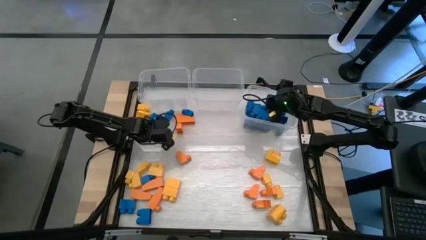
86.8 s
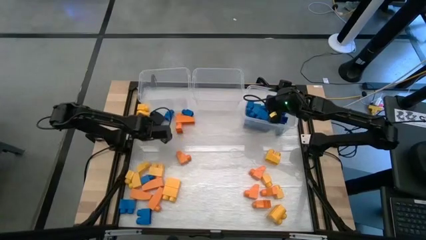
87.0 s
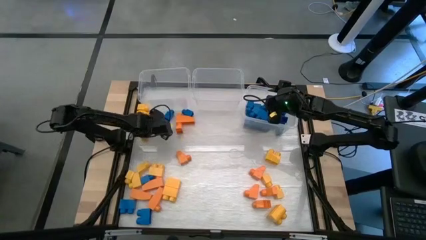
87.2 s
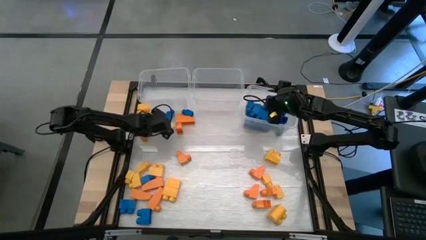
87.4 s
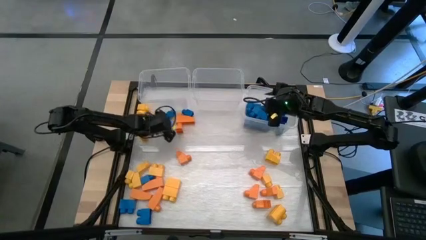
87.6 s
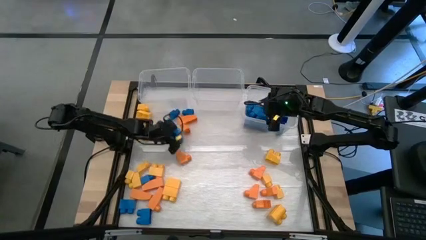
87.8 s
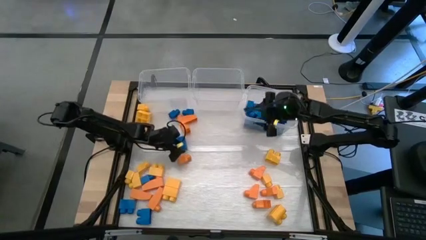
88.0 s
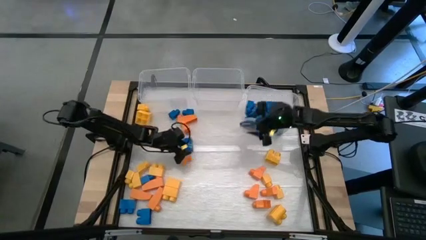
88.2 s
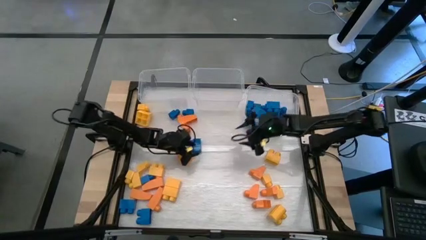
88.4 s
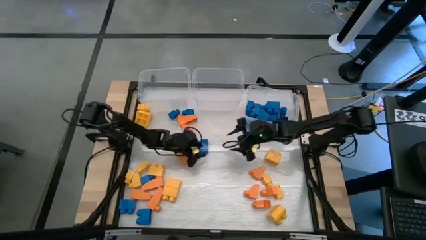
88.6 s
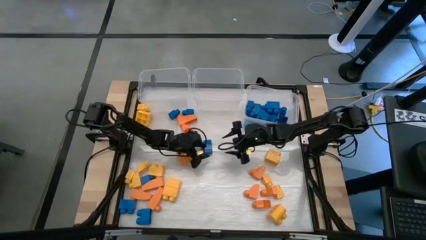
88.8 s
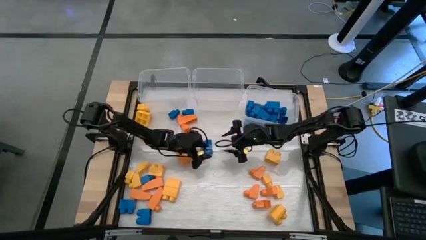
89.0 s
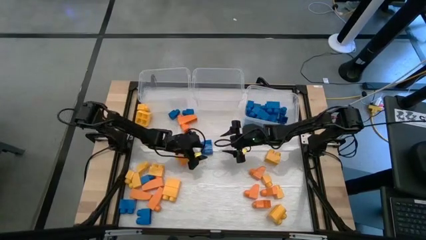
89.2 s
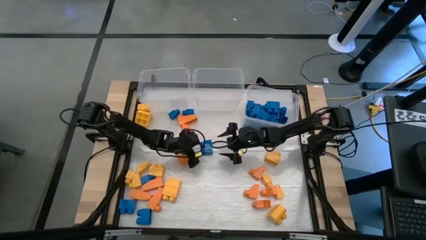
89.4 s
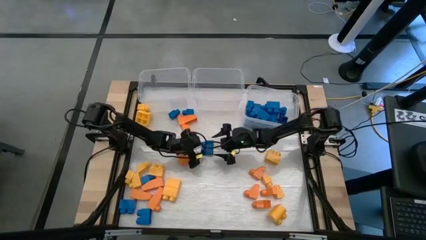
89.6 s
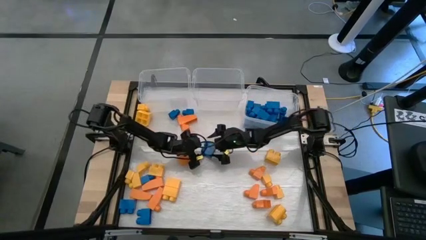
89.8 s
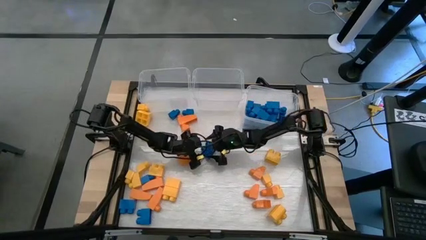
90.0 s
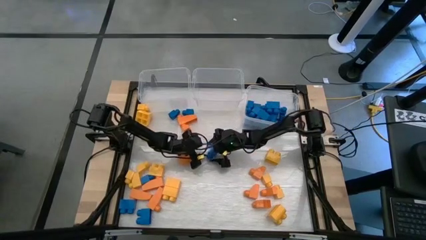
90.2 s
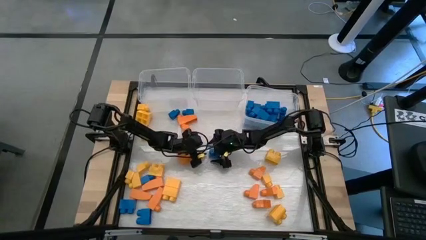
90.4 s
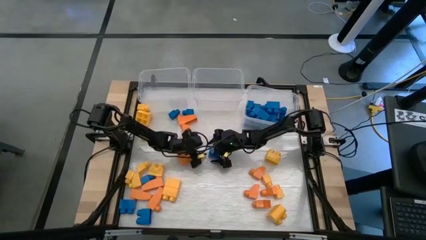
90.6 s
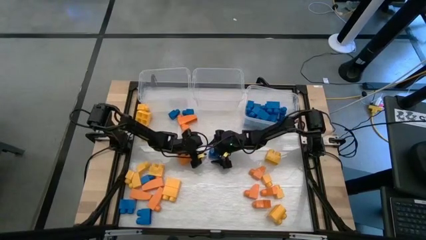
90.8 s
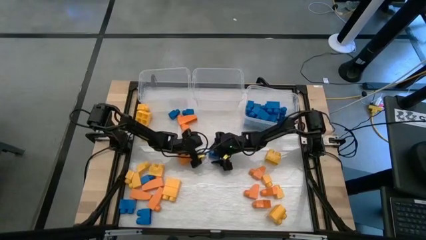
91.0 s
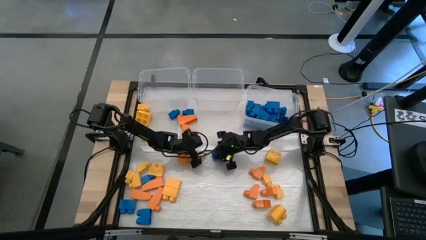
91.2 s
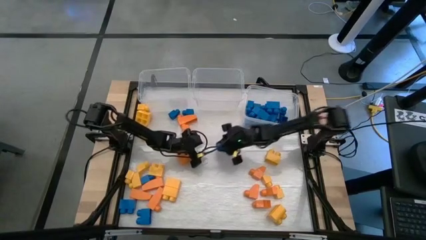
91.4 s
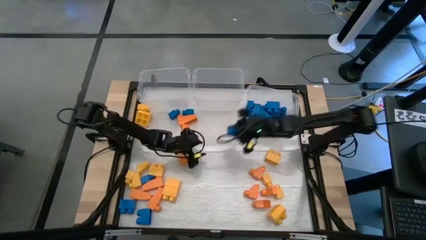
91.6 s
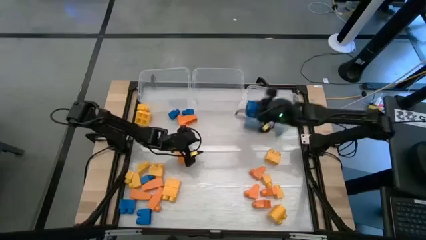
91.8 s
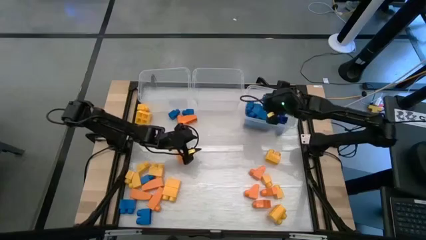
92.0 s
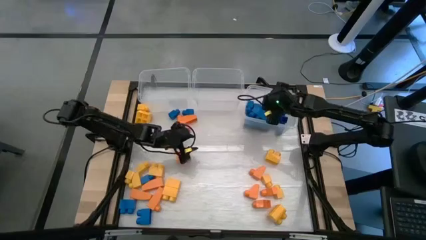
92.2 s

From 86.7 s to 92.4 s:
Task: Sort blocks
Put the blue game piece into the right transparent bin

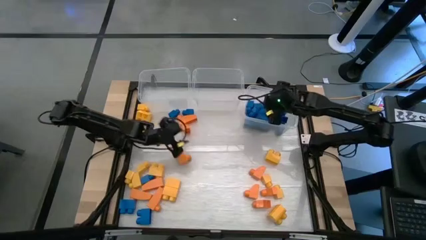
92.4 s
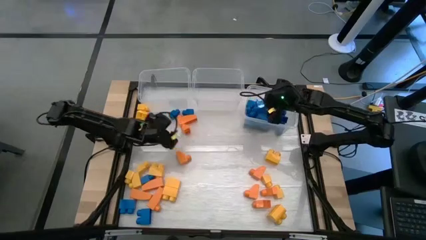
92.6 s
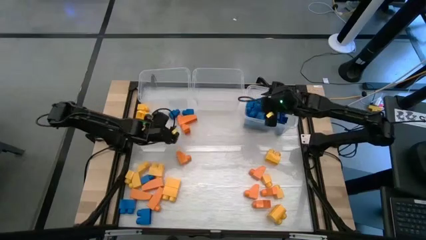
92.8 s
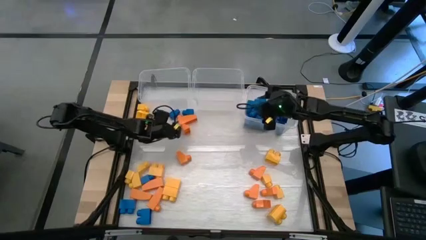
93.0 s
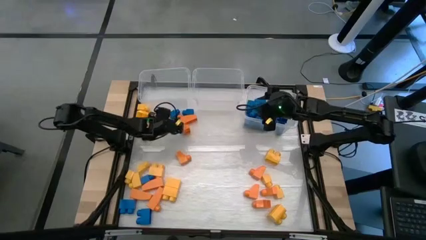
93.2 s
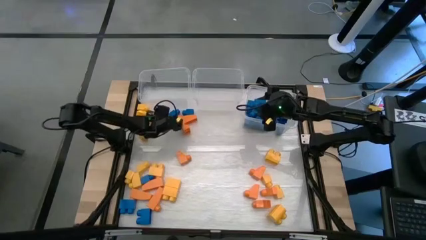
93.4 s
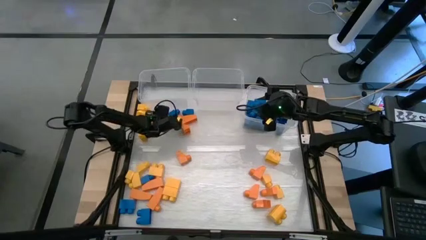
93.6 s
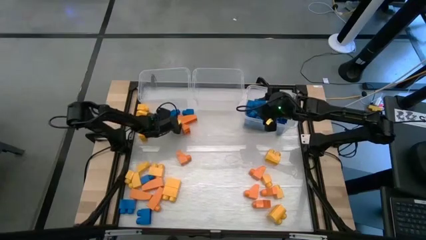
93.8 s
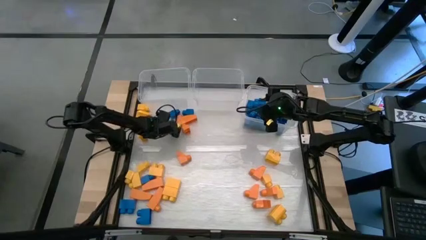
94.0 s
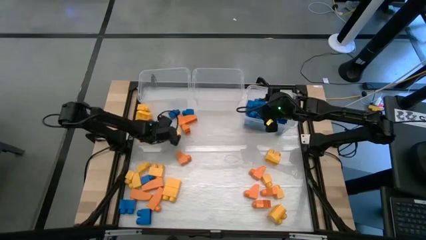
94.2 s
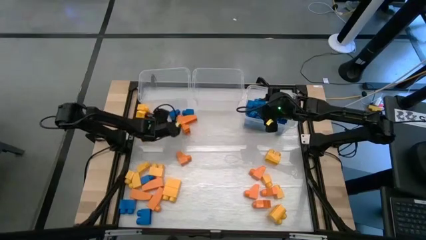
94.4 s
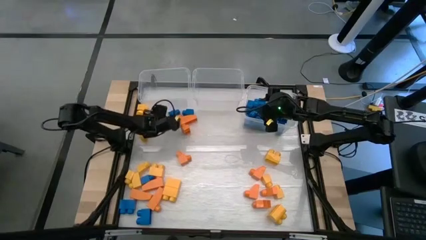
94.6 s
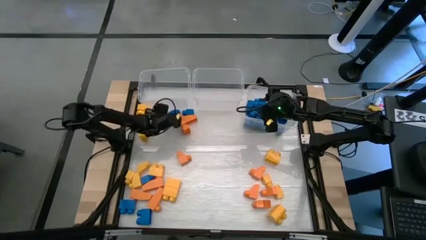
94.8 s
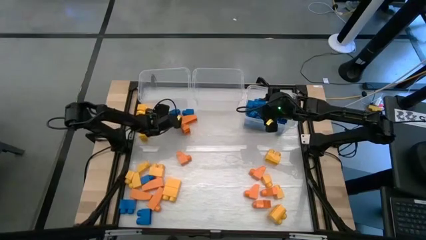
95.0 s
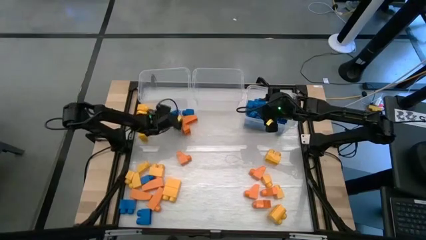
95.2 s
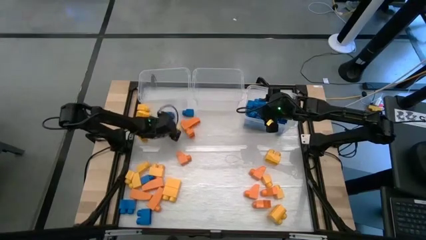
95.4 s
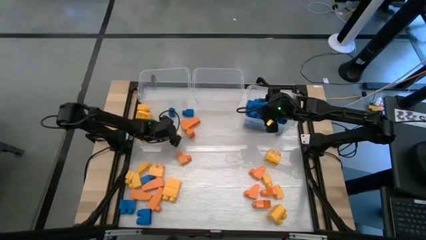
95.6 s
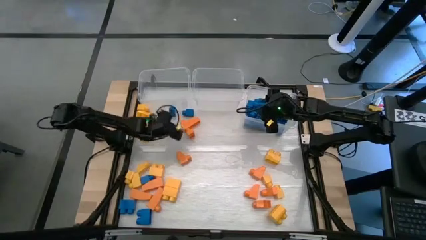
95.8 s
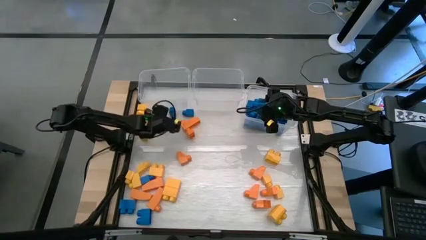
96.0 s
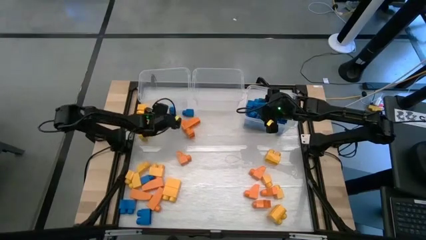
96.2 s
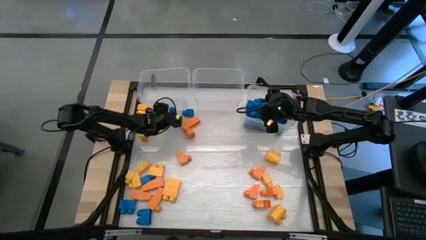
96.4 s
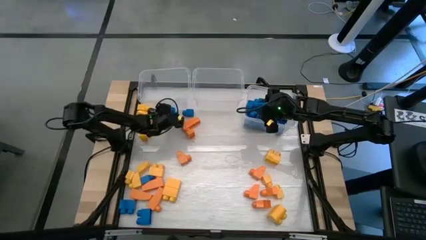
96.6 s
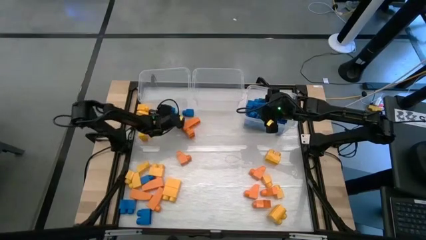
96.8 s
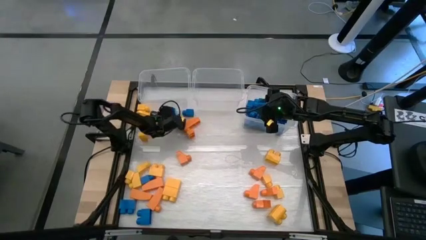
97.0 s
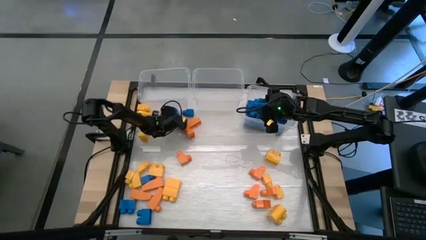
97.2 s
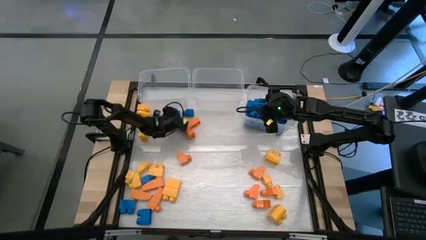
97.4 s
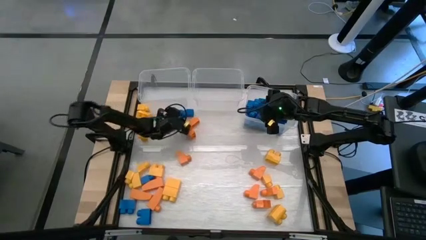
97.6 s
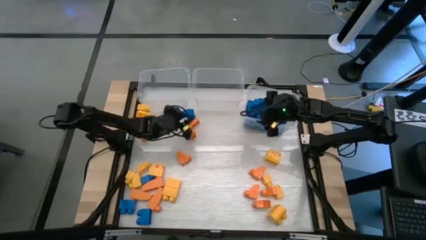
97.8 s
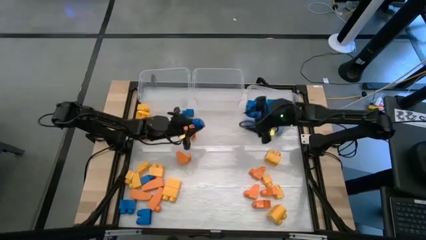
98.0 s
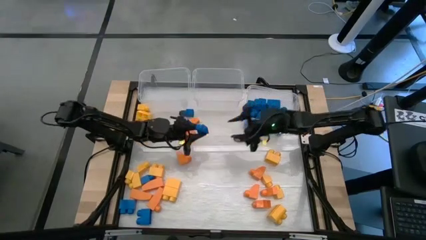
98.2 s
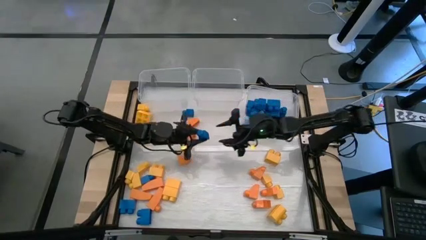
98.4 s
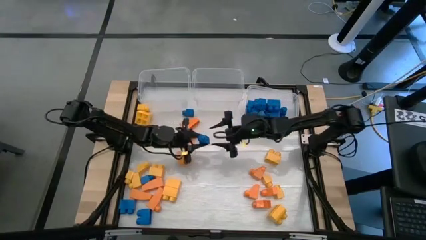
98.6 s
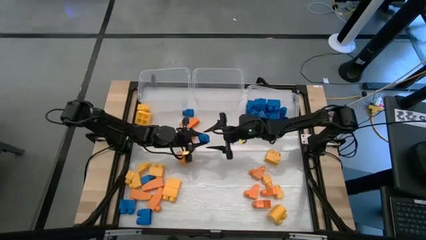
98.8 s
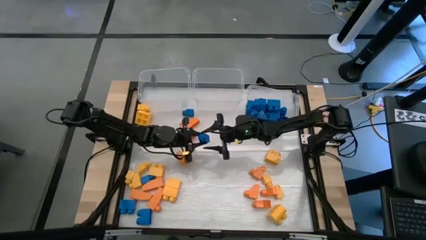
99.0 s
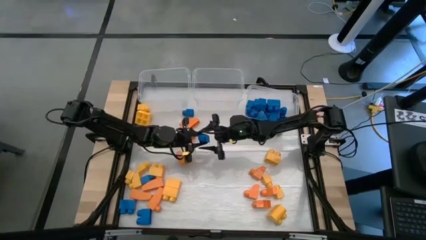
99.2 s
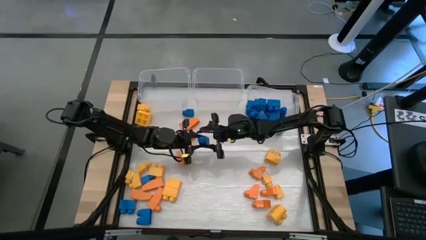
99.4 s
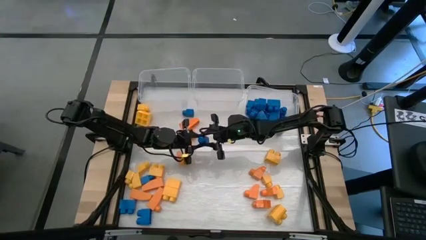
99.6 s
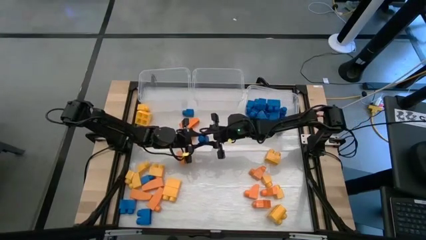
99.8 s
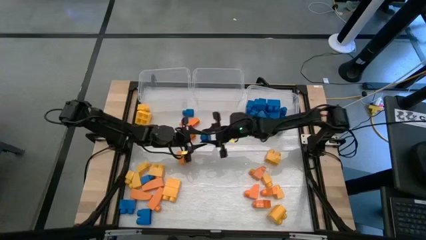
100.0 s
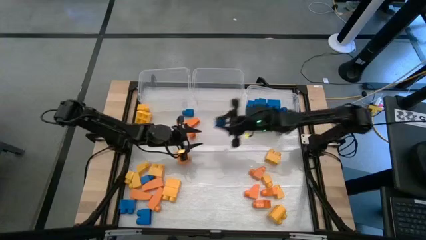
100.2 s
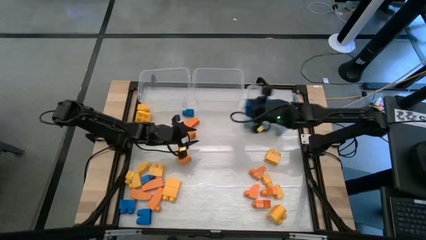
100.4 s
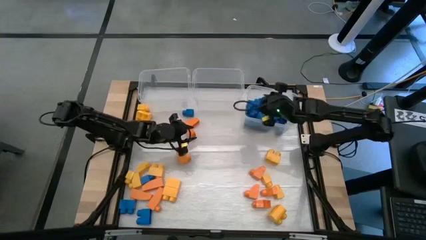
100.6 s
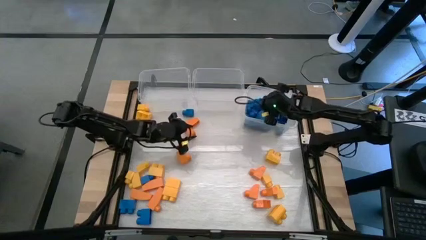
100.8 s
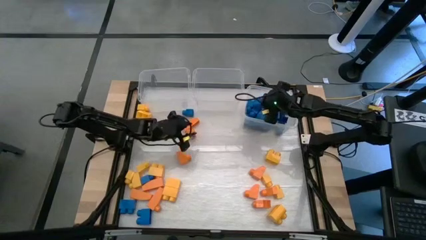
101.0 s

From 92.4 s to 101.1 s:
Put the blue game piece into the right transparent bin

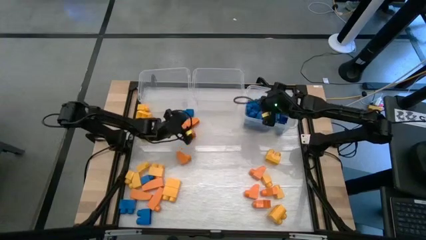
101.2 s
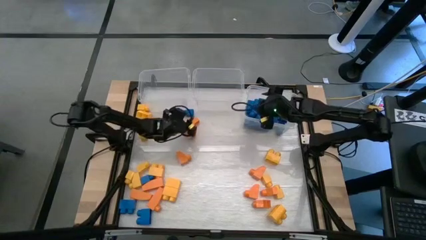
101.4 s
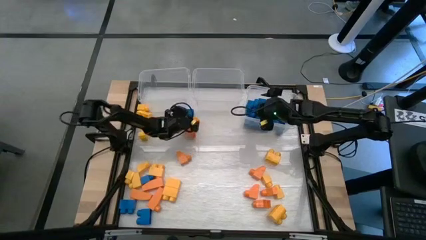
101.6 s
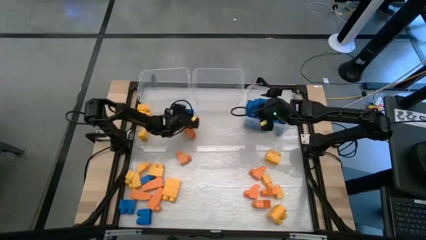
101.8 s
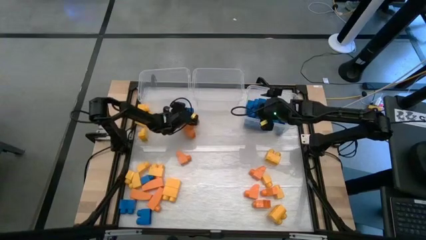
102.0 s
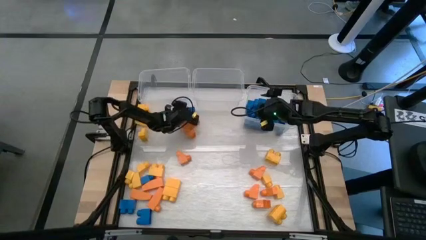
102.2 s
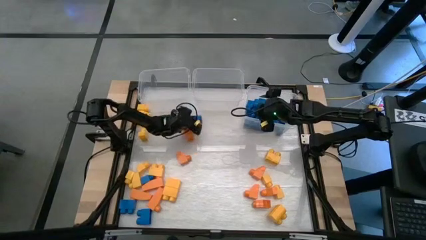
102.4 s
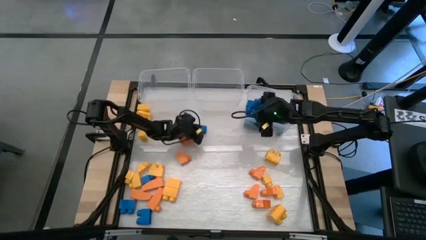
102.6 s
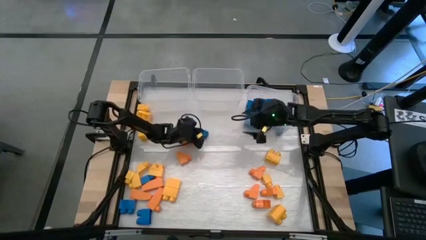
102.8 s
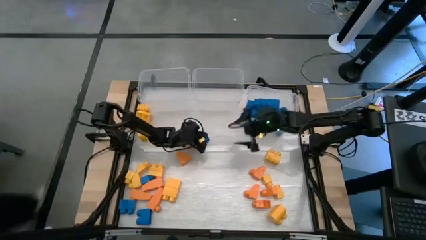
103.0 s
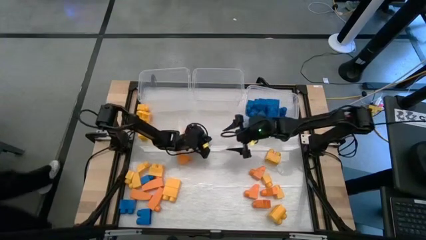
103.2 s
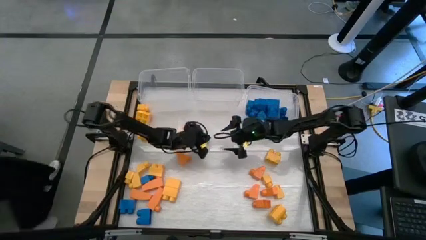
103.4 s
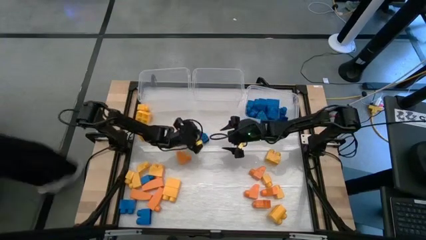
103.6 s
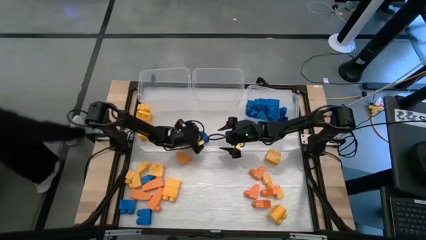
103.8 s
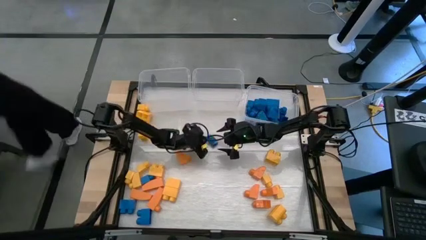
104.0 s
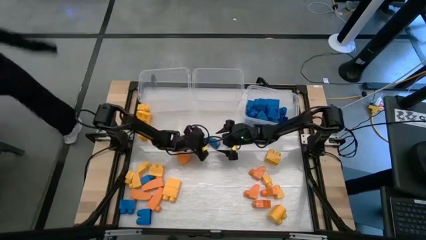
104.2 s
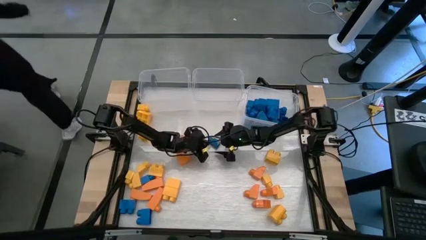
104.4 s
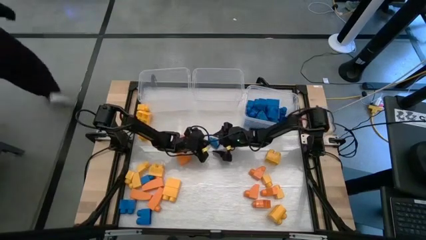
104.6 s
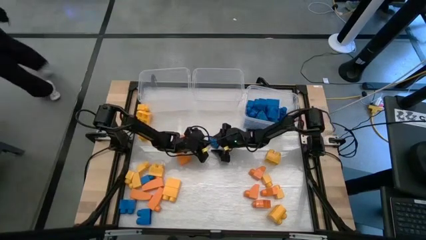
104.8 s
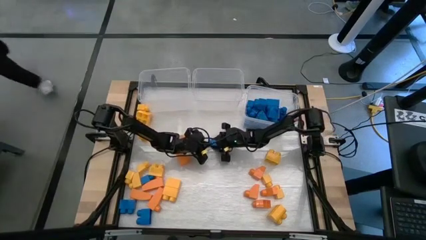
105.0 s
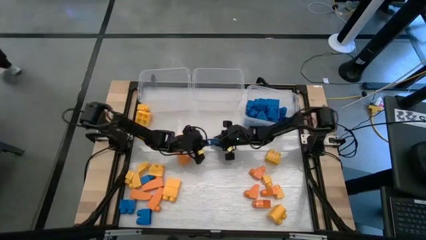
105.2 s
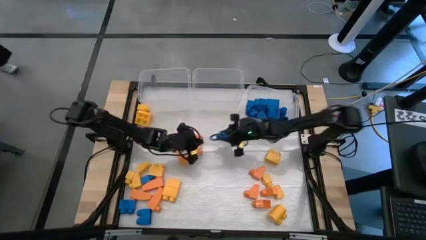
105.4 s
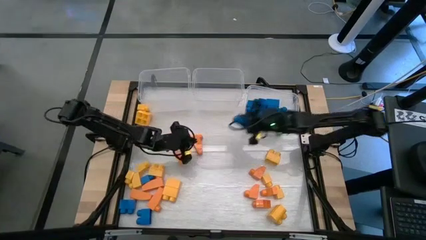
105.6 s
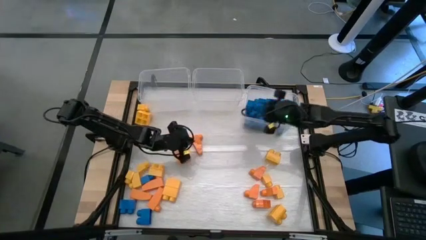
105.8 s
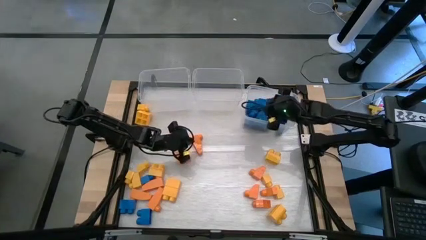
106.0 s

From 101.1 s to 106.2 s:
Put the blue game piece into the right transparent bin
